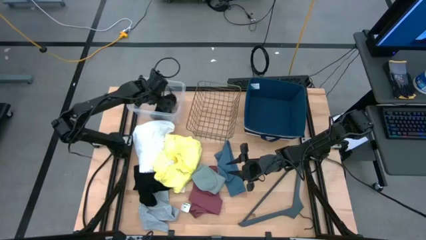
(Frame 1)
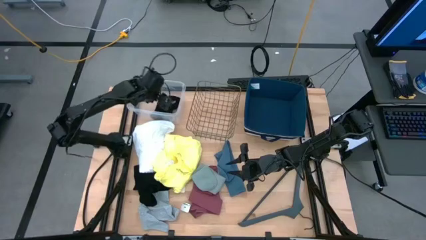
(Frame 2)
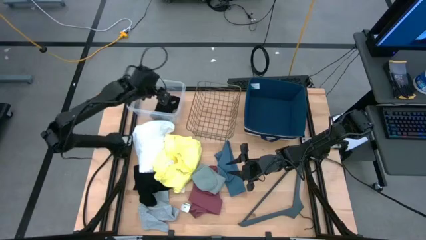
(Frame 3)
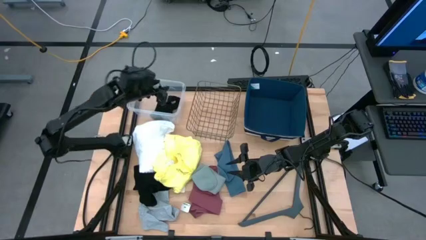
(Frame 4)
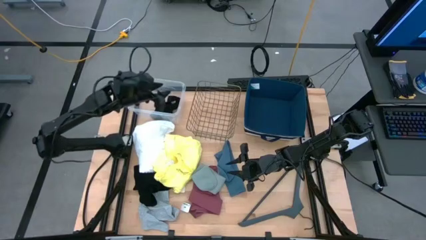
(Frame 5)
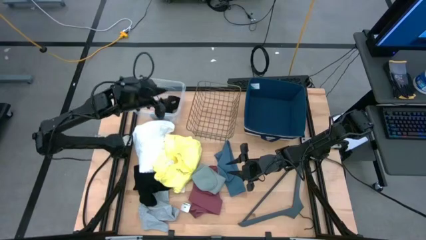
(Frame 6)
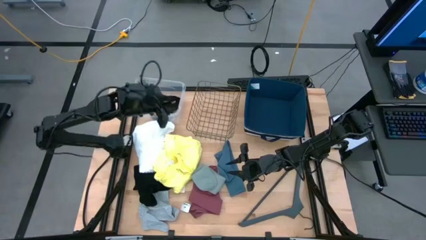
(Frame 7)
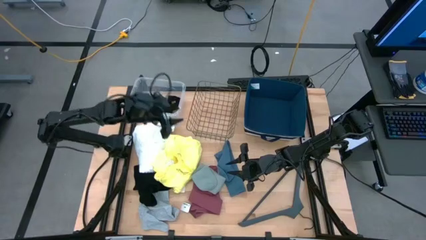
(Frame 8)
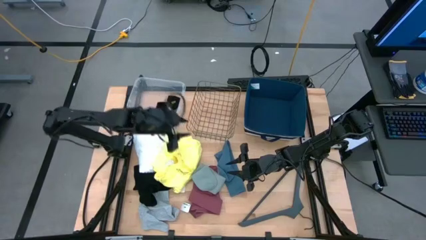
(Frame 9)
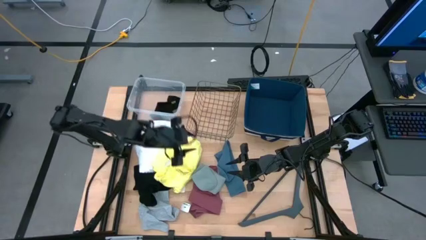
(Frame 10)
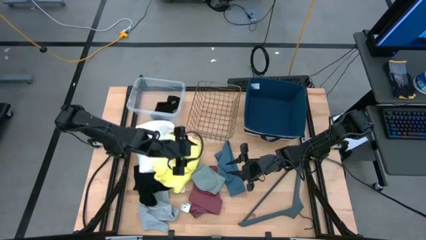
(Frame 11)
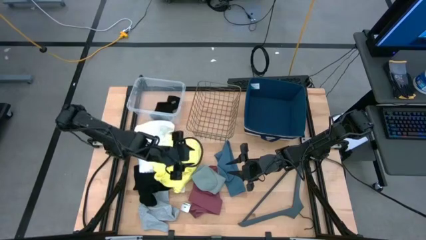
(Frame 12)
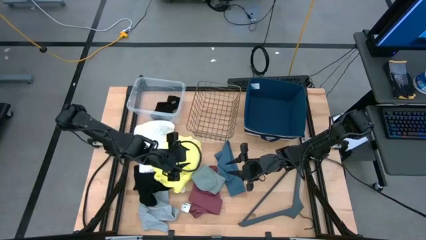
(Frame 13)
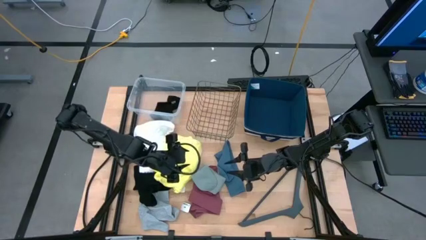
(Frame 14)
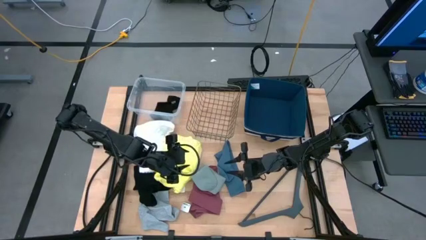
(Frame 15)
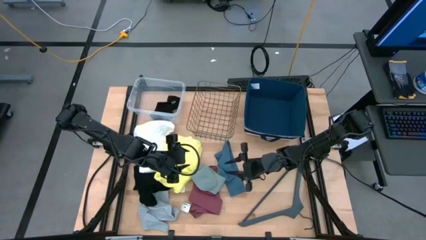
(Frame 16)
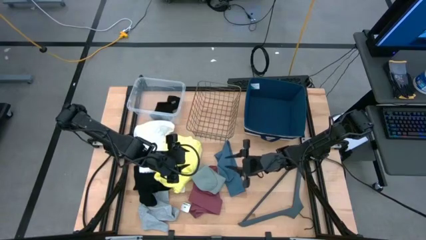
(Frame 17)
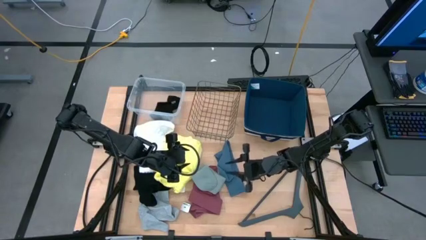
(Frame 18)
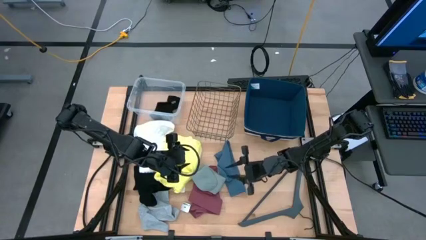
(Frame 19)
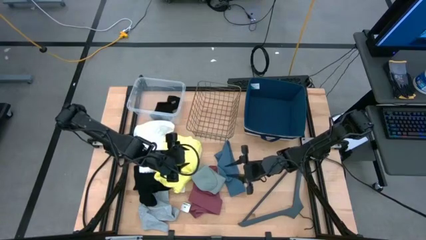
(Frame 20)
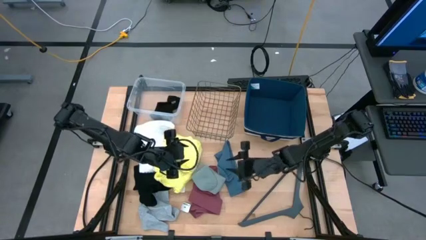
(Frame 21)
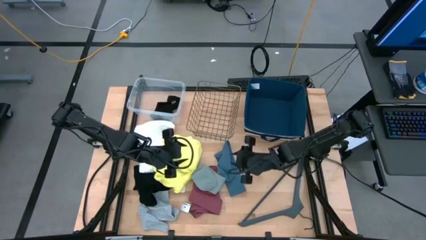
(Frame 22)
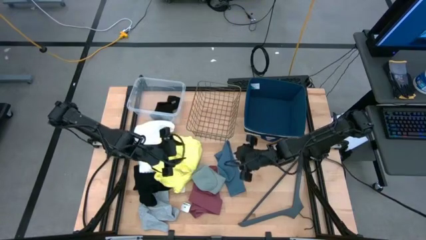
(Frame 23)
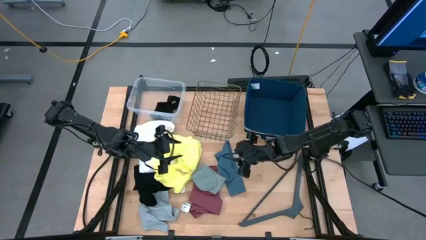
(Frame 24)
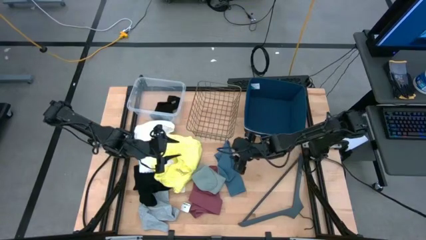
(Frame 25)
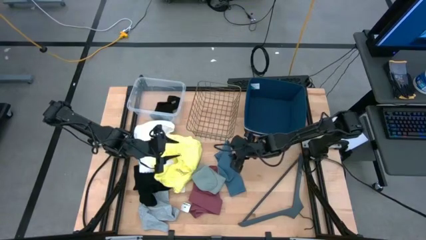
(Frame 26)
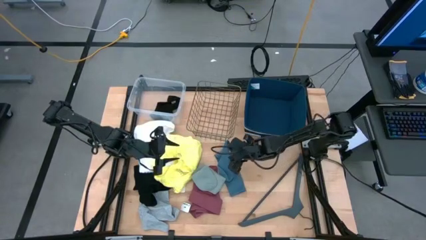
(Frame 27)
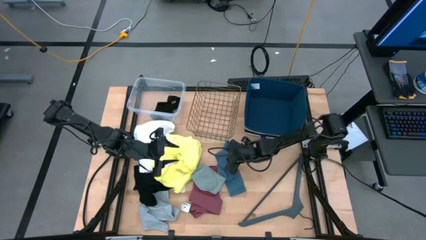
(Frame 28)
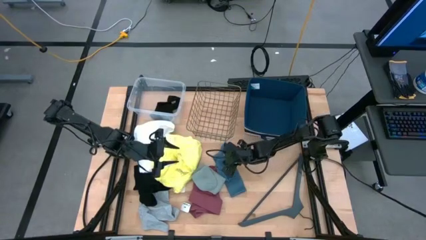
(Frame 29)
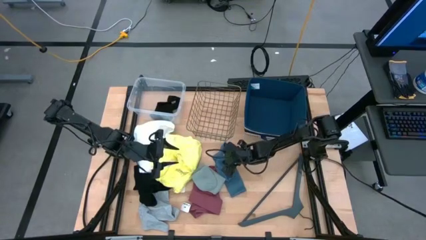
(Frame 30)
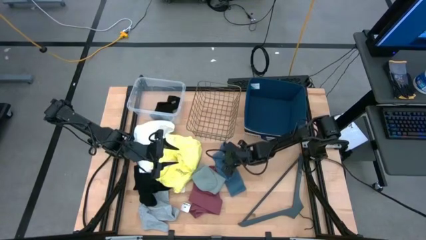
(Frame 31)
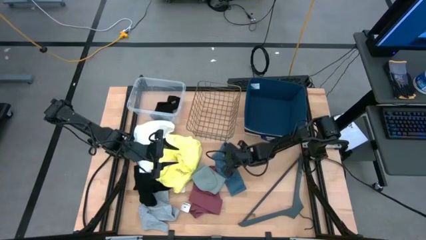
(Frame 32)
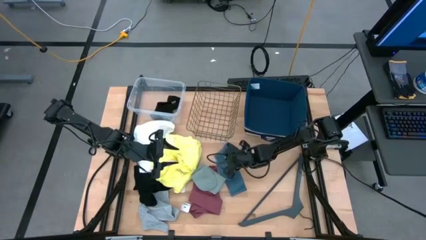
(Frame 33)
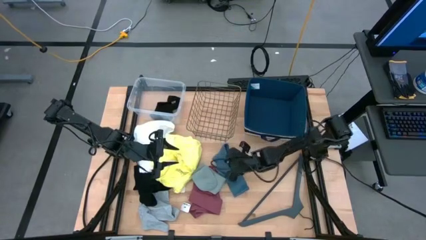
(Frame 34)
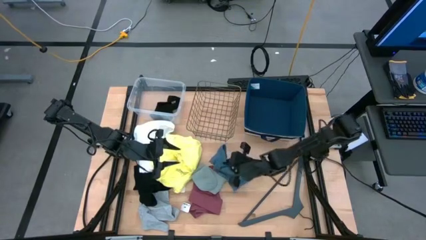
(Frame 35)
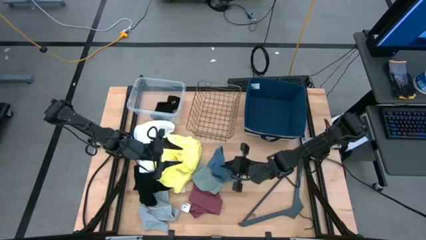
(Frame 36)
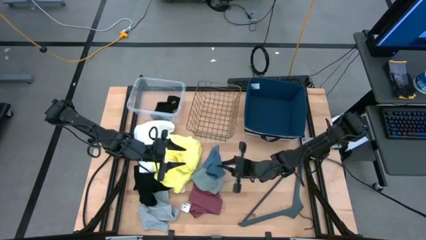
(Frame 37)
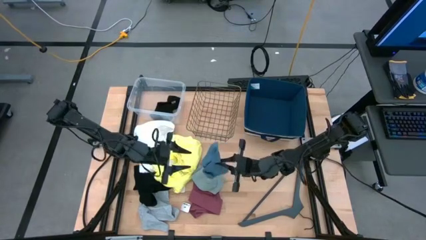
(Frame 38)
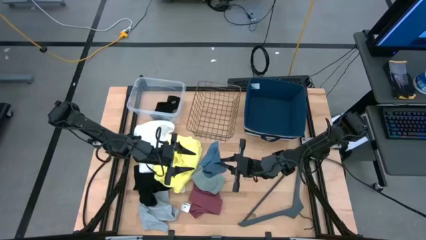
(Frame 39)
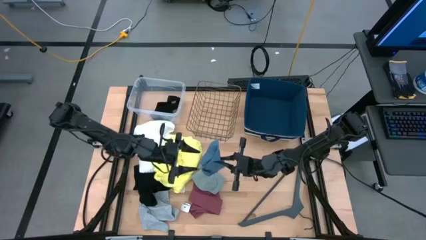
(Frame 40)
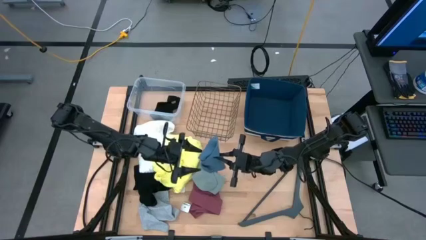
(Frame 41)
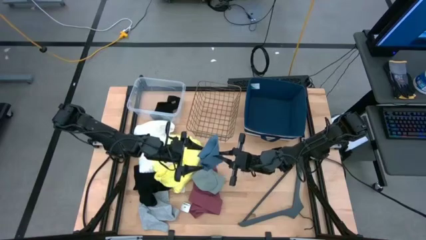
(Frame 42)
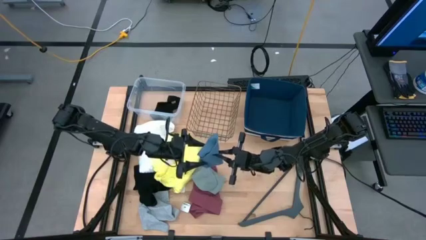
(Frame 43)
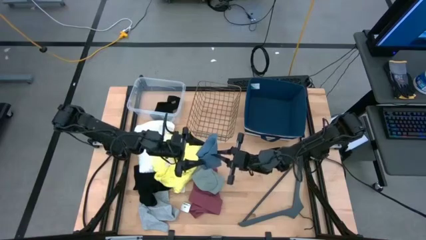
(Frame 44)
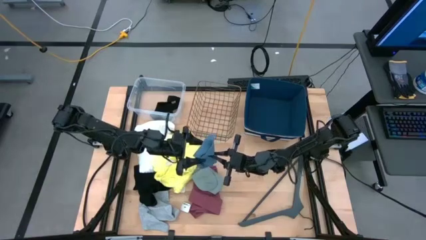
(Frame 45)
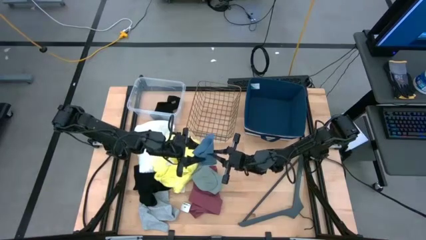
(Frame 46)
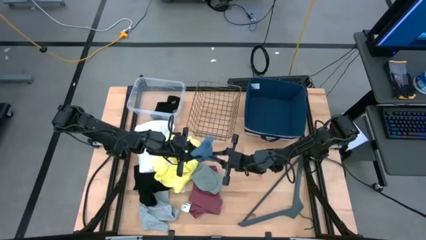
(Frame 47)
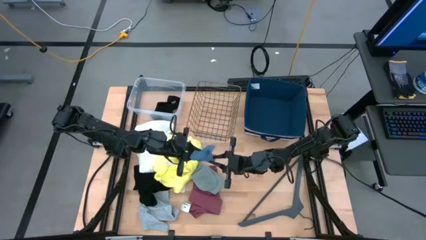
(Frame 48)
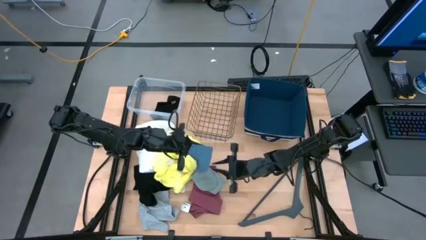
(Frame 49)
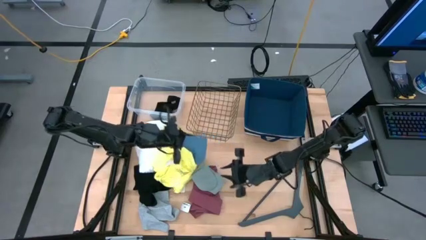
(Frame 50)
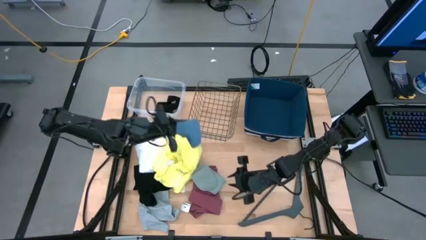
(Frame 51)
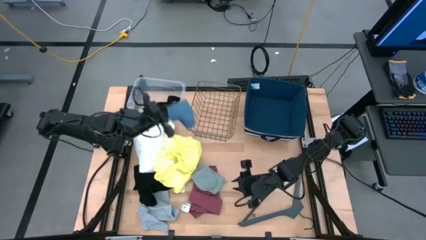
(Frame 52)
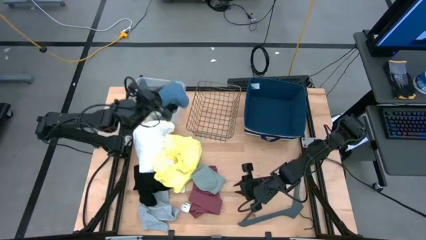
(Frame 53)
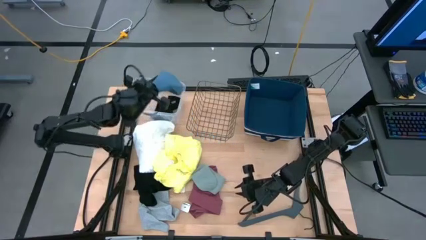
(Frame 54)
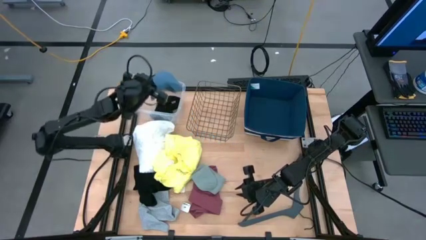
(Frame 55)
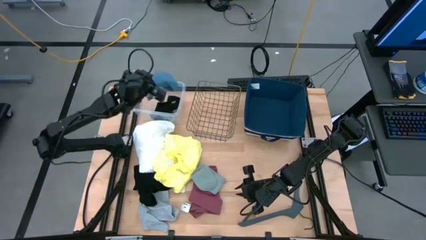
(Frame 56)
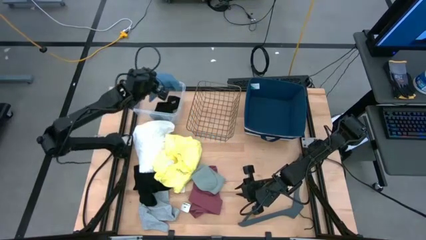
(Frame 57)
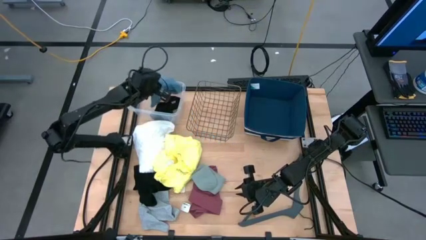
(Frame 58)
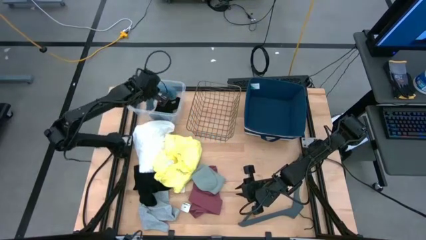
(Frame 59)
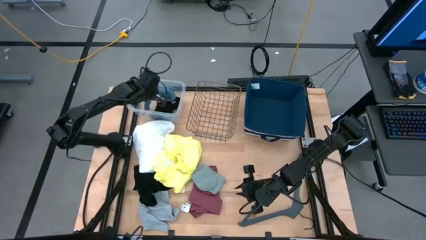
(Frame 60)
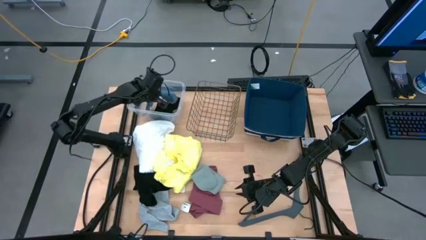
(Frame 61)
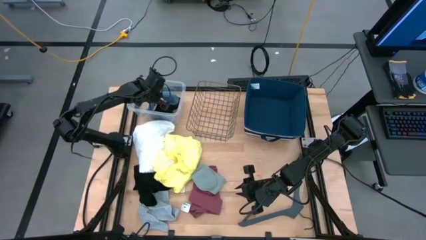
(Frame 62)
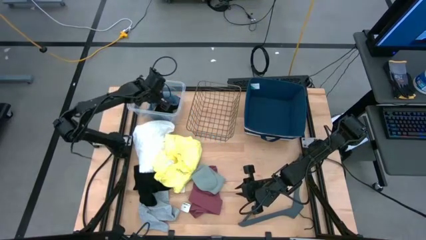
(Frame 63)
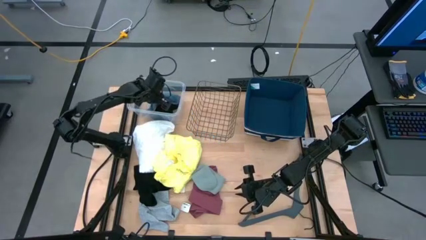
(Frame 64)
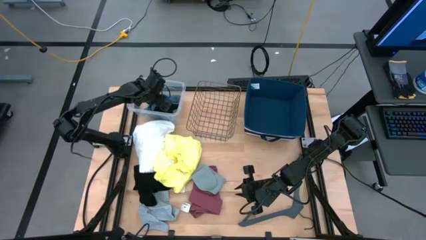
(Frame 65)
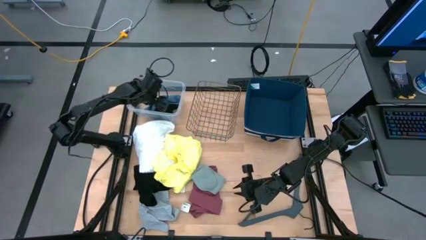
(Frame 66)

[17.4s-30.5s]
Task: Pick & Place Cloths
Put the blue sock into the transparent bin

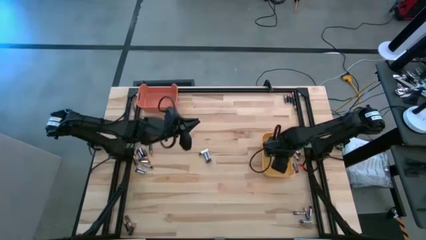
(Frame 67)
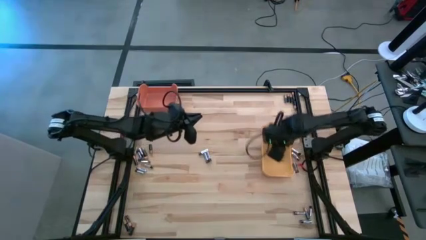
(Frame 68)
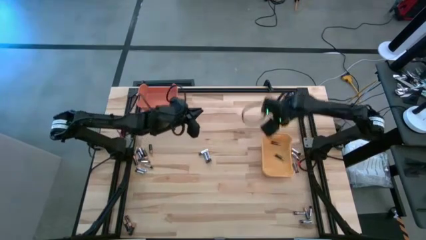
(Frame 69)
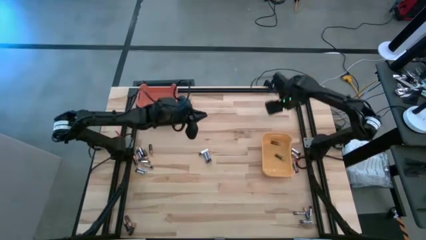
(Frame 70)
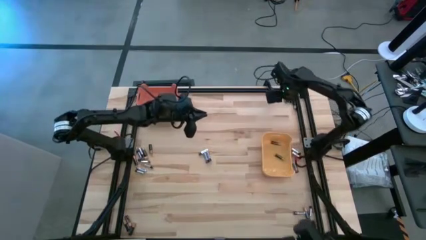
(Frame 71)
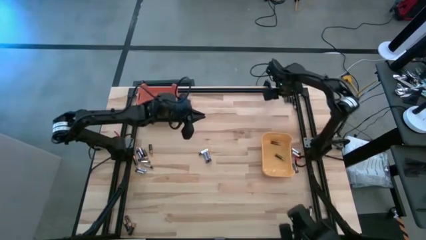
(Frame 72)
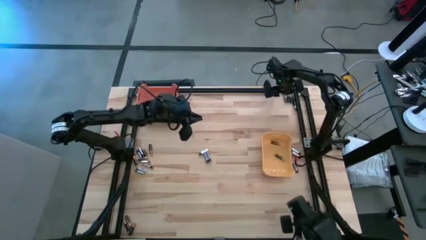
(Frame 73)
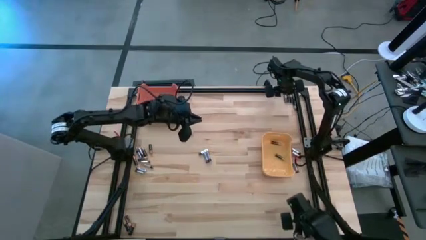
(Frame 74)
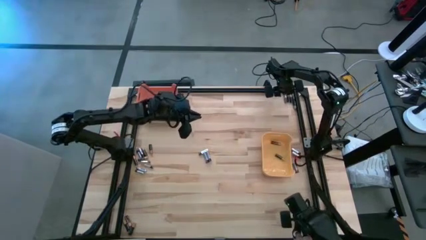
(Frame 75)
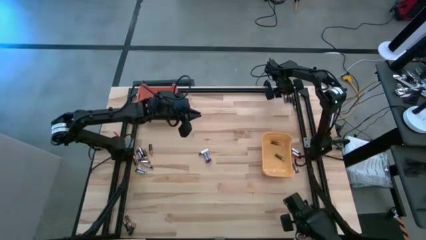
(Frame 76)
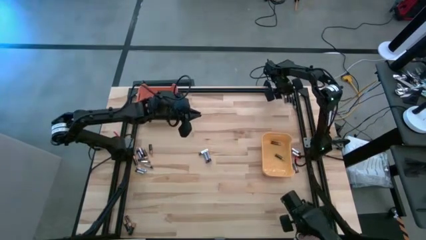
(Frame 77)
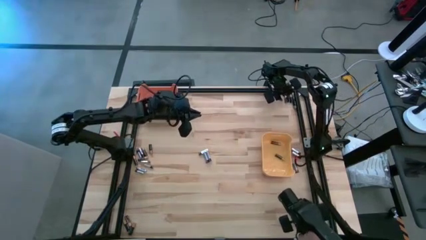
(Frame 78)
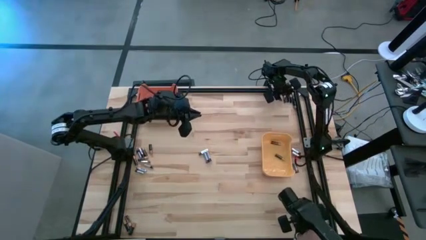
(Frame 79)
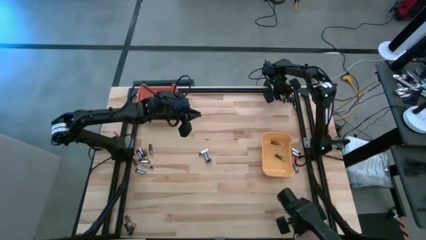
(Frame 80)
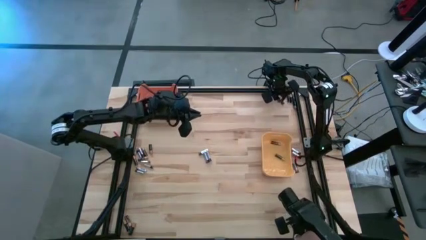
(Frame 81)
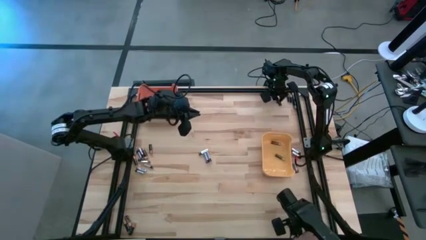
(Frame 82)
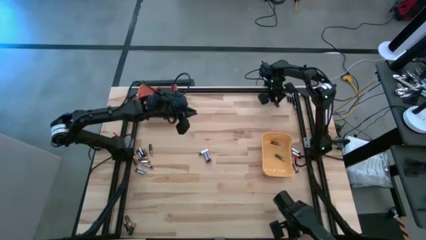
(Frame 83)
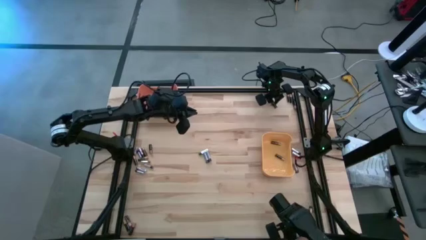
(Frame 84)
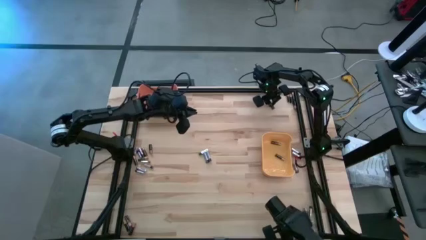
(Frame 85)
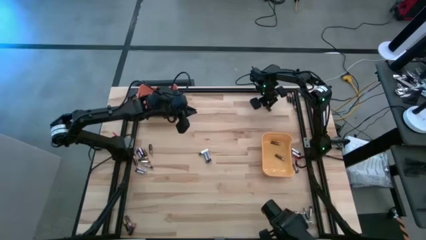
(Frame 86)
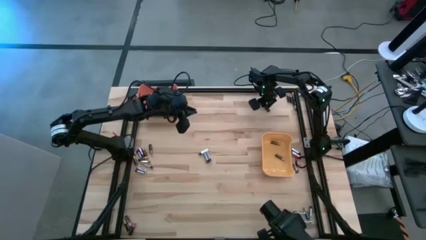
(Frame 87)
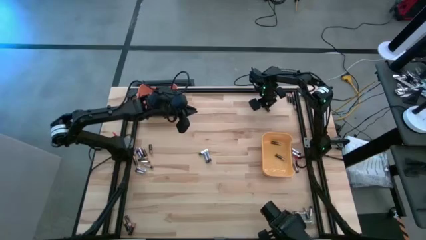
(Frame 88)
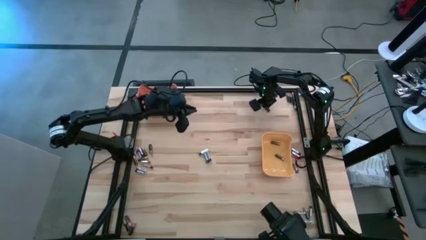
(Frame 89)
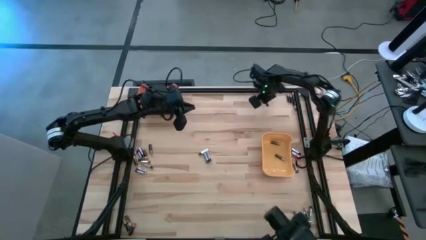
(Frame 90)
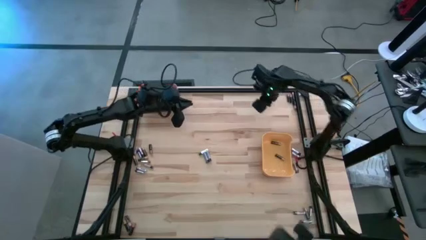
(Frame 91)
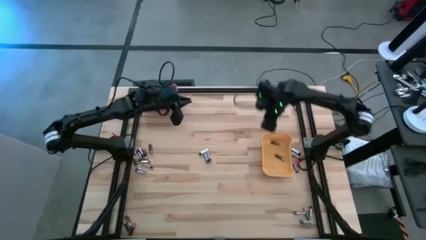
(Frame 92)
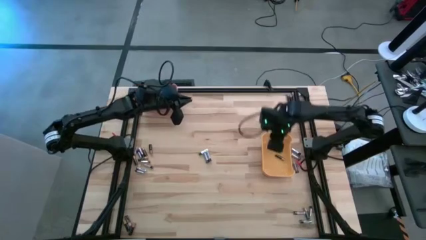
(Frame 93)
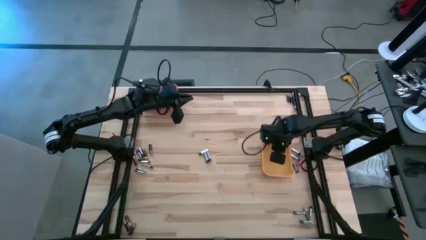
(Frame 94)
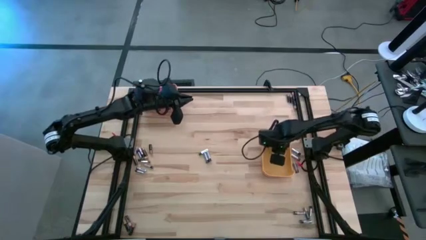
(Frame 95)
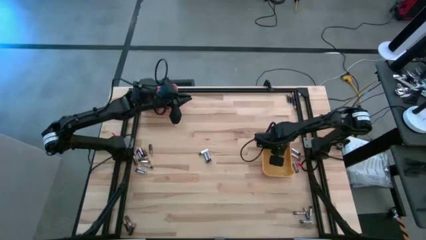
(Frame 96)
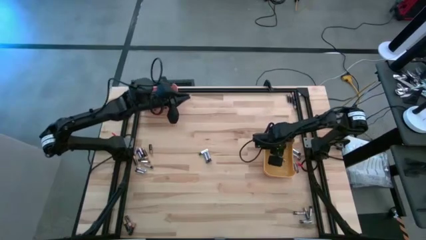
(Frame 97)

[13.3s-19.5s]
Task: Sort batteries
Put the black battery into the yellow bin
